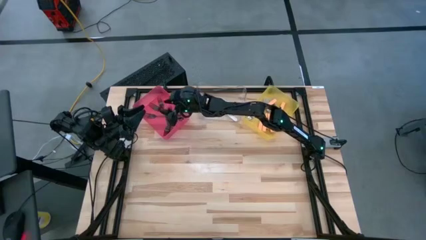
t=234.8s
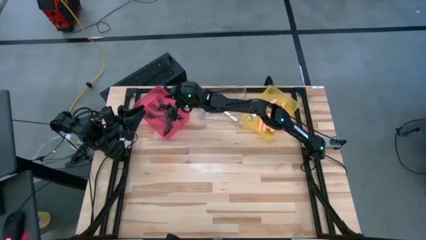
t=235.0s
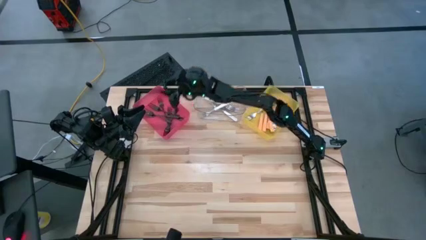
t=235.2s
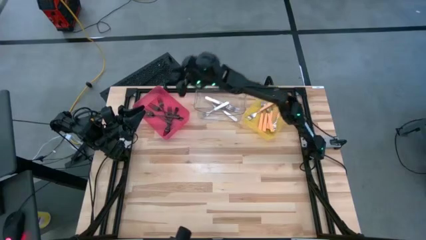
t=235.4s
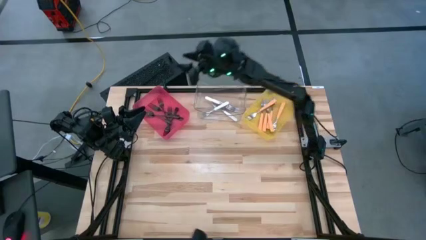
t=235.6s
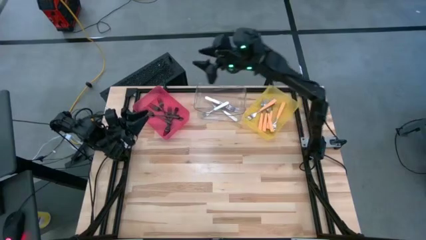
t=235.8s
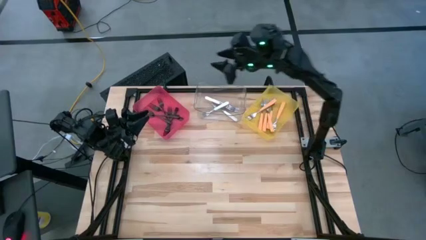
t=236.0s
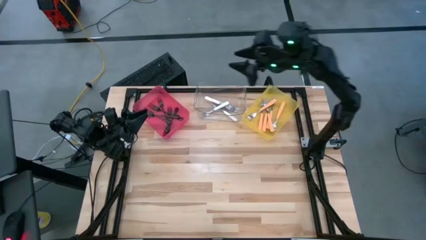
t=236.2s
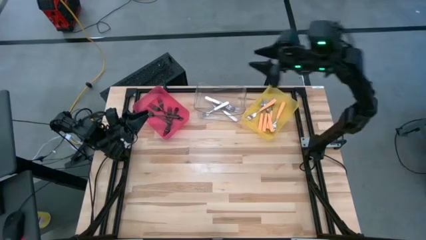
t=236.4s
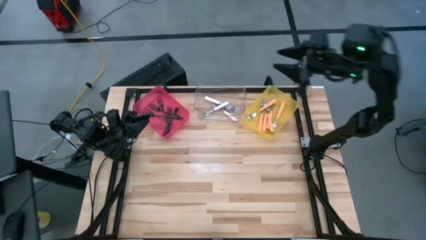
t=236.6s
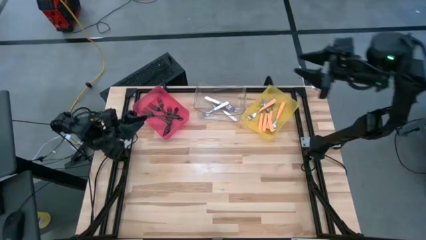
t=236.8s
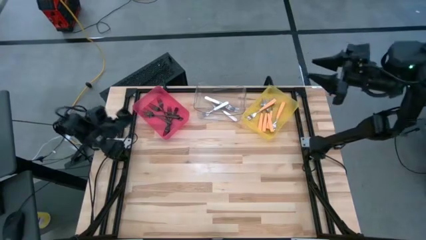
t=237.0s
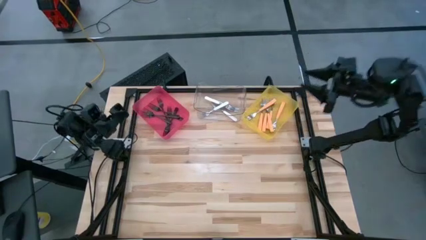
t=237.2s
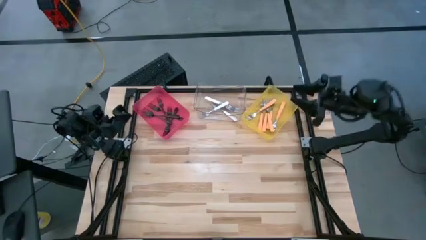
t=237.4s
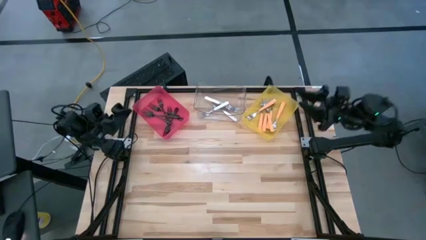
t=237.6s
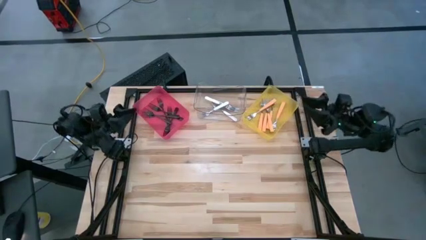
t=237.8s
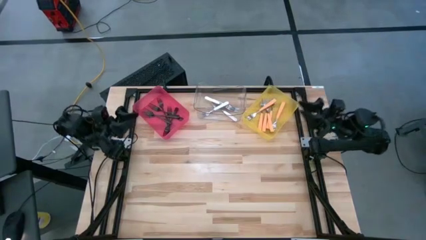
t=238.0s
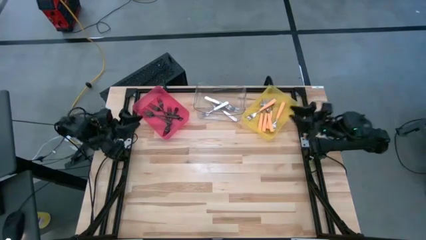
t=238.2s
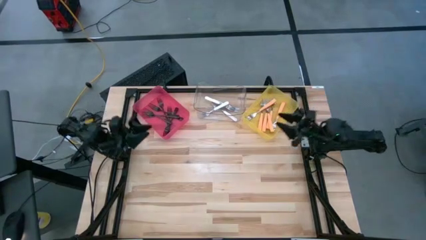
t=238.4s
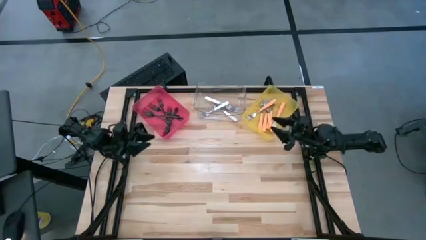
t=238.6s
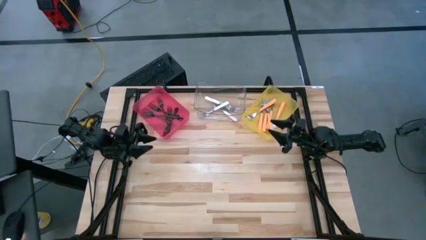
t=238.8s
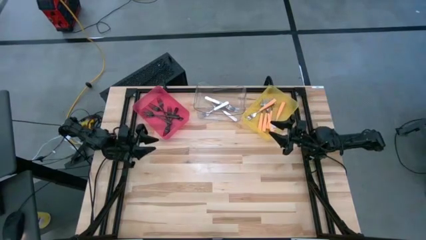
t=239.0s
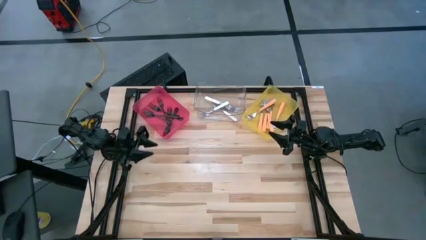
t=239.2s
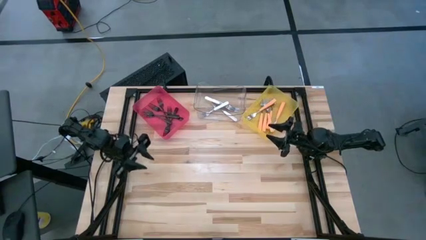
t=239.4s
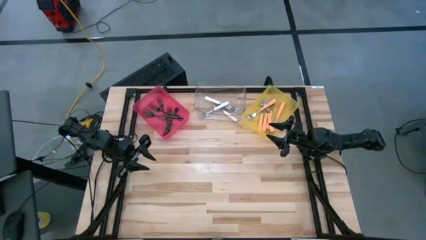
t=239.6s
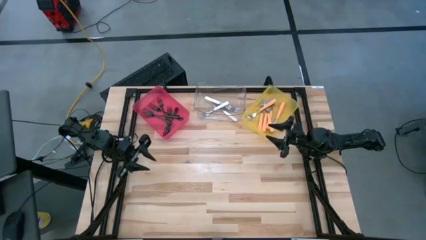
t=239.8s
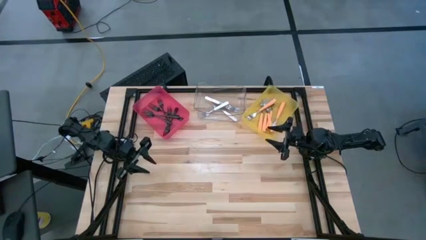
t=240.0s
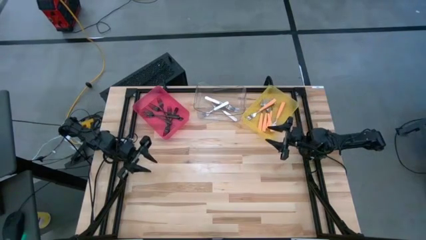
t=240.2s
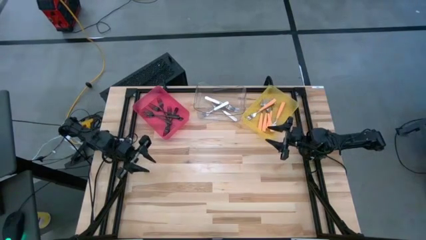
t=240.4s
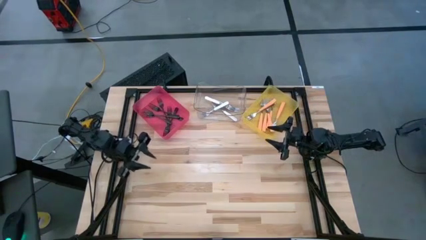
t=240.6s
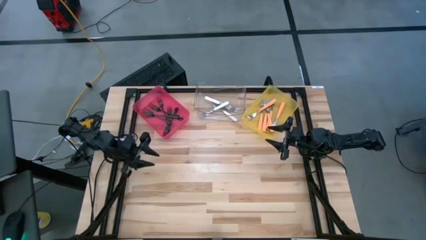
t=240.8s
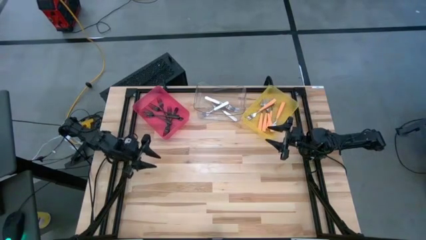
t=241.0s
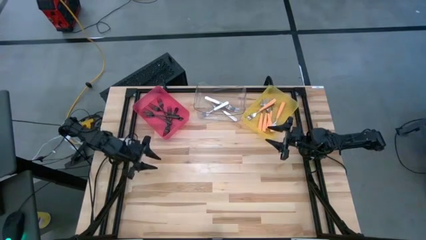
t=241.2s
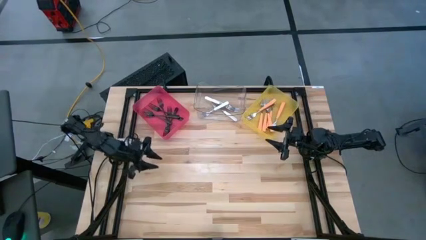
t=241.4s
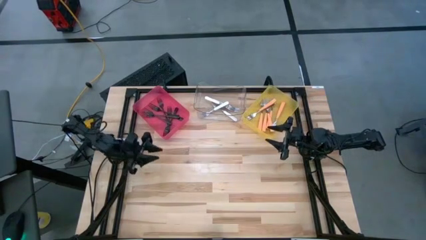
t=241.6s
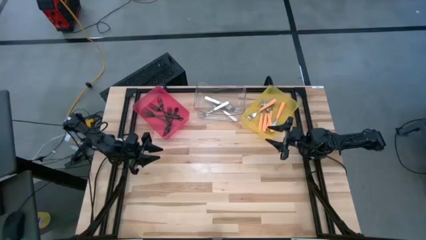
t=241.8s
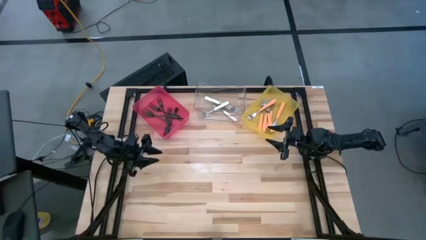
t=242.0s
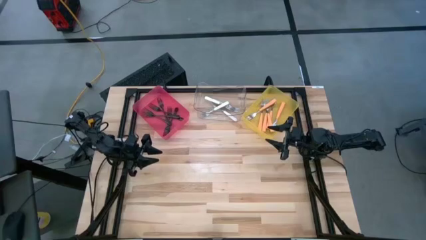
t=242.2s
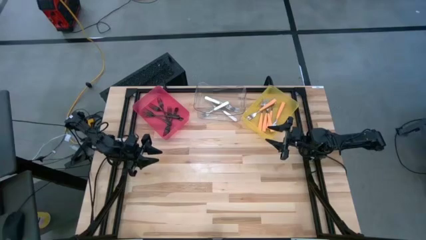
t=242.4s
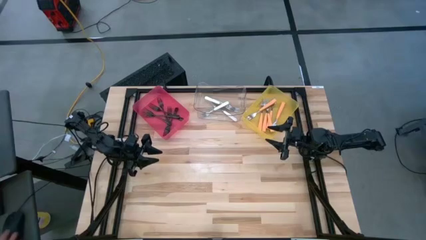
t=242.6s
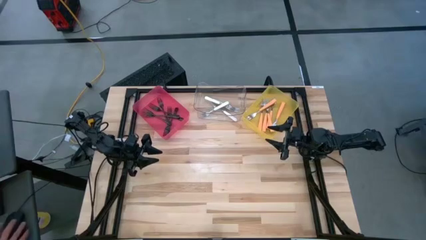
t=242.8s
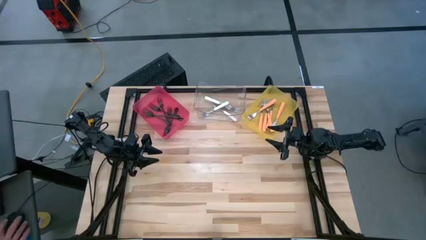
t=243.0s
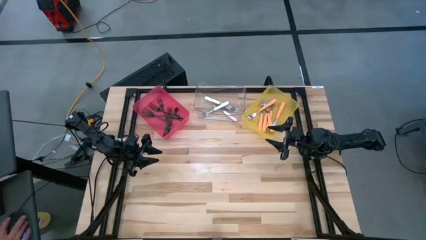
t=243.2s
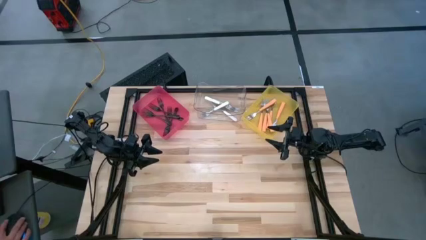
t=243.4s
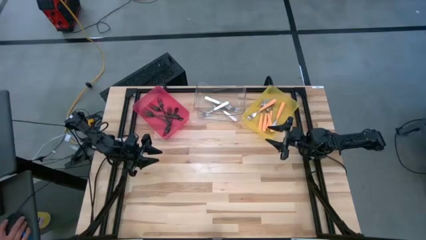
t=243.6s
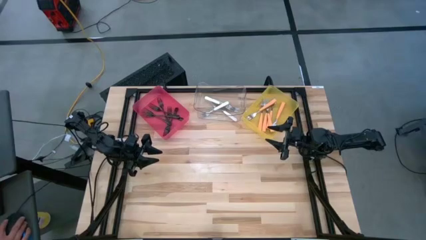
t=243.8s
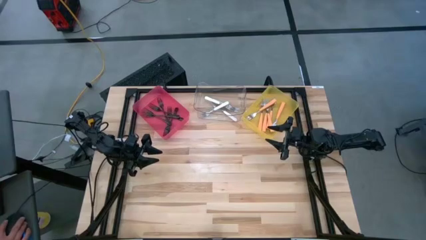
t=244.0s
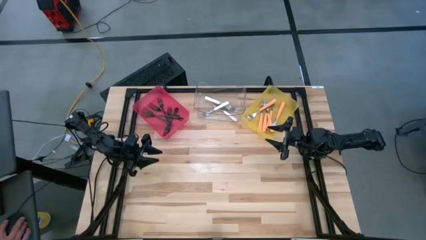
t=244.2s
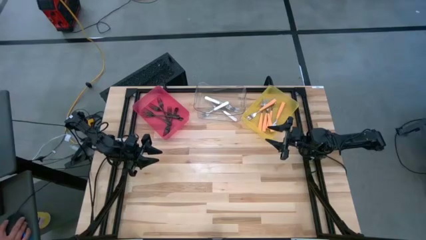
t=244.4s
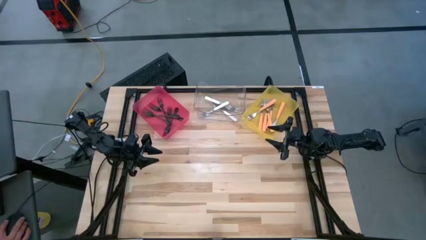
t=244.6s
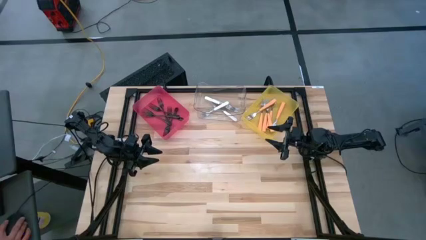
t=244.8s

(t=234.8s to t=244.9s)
Task: Sort silverware by color (type)
Return to Home Position

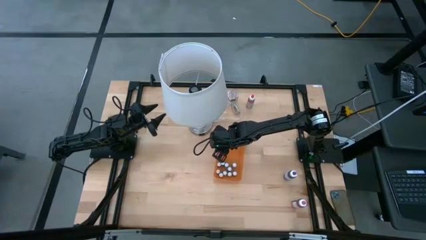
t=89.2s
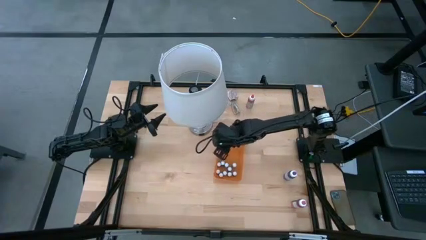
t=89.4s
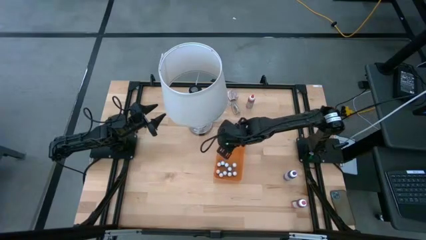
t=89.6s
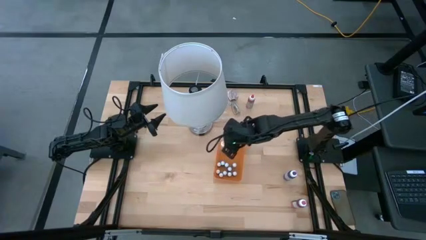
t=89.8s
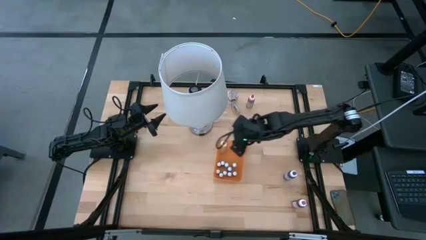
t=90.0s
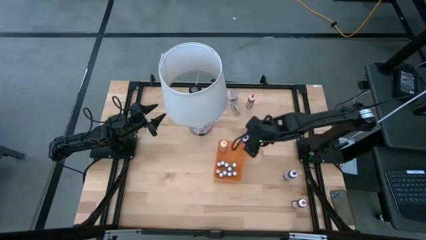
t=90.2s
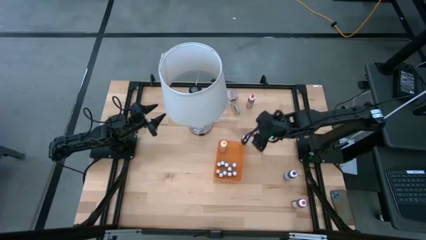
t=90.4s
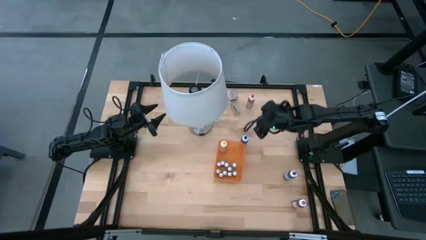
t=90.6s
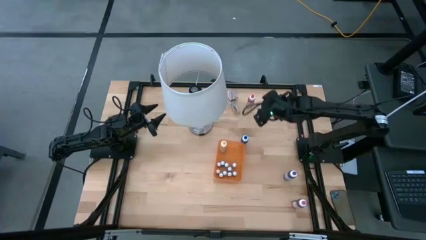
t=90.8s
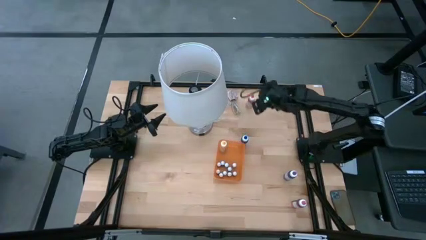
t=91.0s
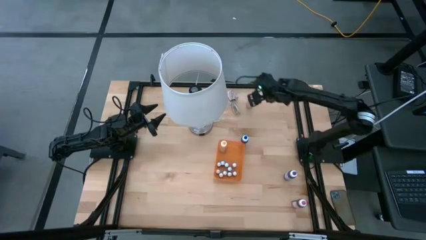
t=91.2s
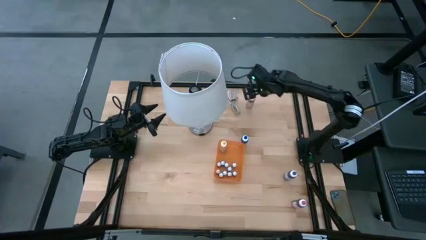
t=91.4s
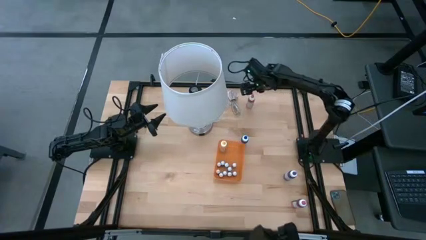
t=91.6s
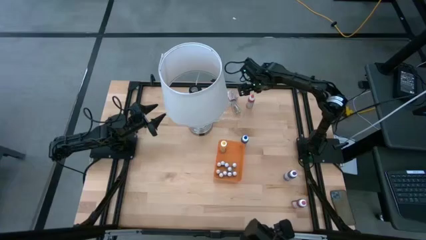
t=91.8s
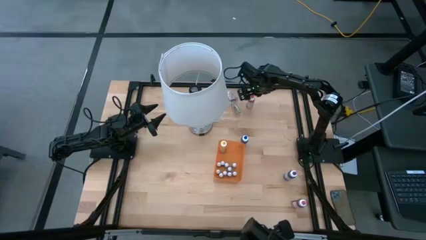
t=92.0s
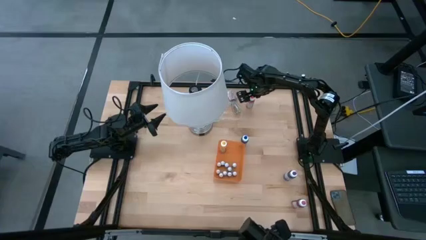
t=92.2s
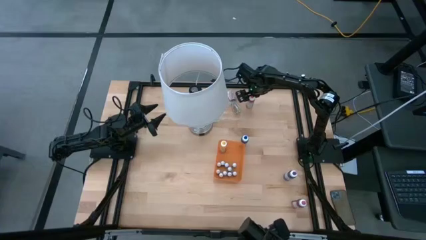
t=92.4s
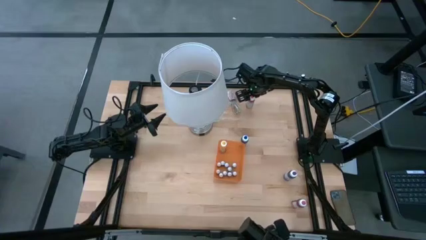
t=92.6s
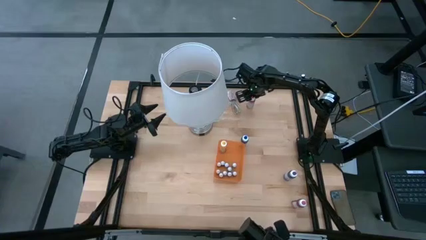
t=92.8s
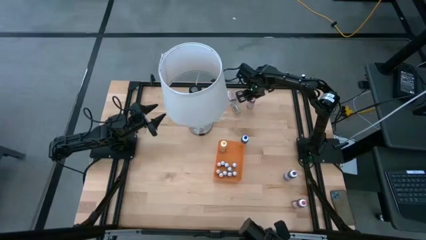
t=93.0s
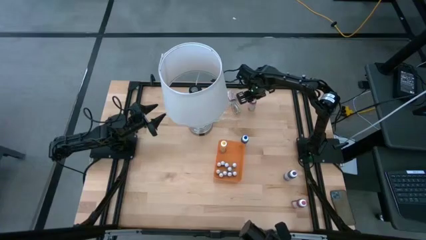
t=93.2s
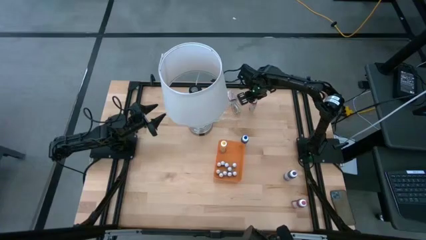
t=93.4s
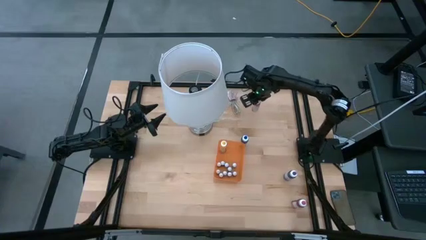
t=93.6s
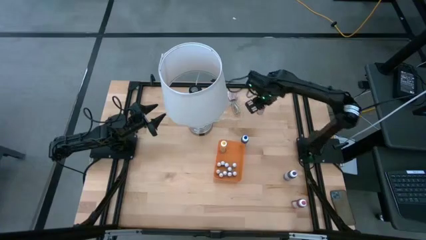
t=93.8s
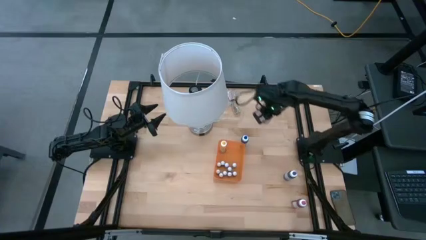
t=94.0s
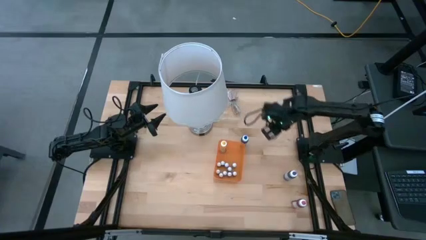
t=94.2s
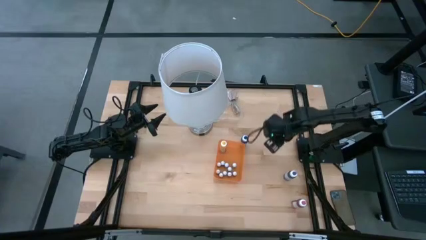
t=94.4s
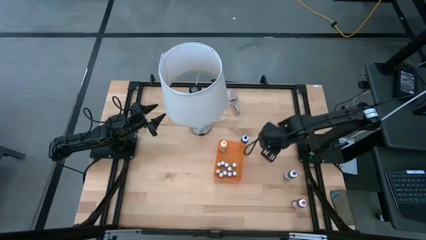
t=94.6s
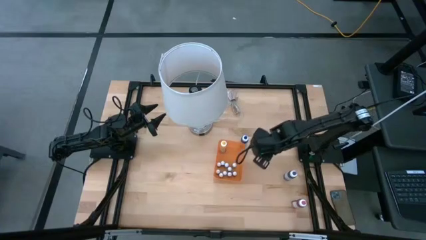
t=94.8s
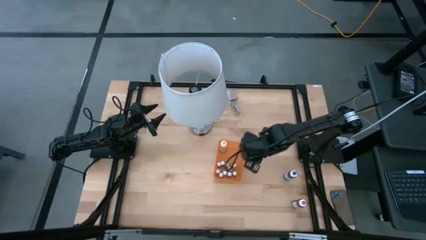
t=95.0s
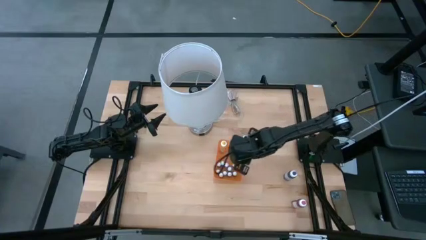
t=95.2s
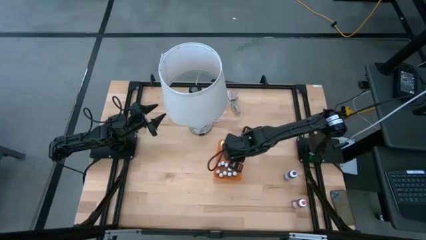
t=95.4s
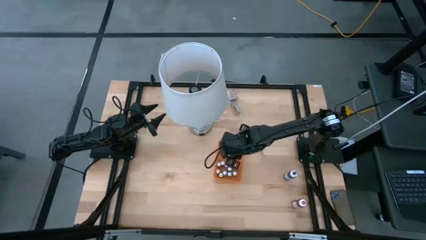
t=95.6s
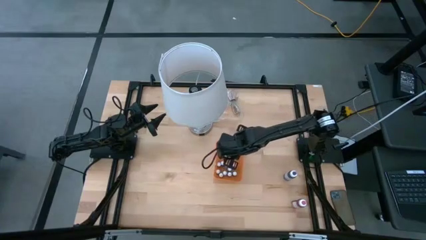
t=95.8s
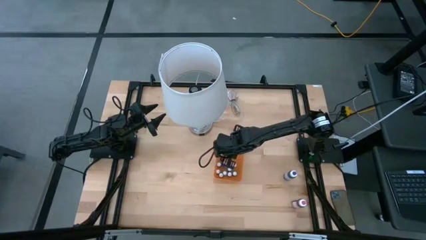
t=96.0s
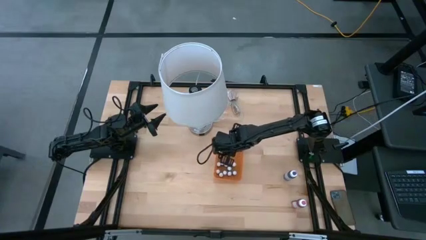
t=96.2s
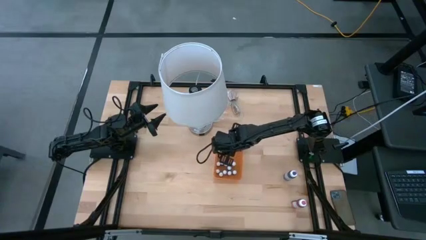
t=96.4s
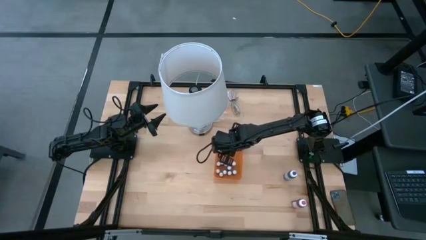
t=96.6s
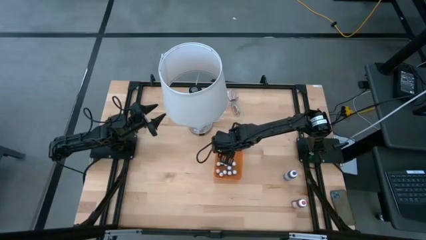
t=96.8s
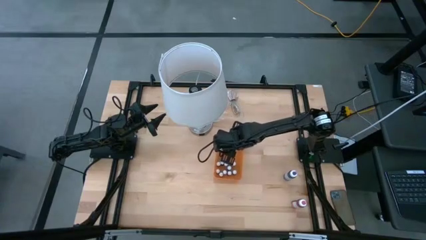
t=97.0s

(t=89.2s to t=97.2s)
Task: Pick & Place food coloring
Put the big orange food coloring bottle into the orange bin
